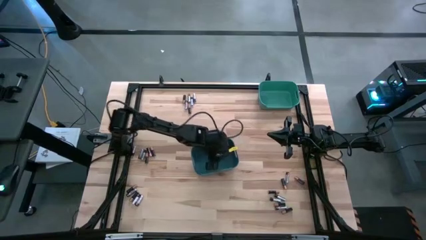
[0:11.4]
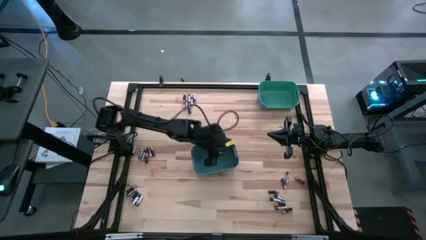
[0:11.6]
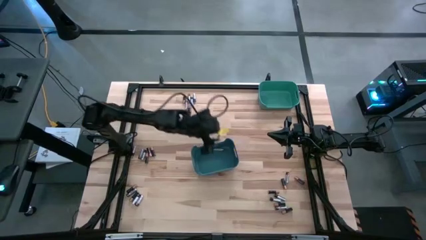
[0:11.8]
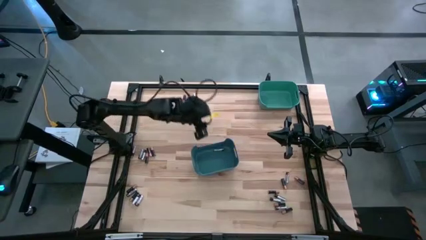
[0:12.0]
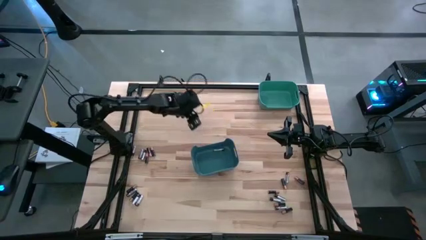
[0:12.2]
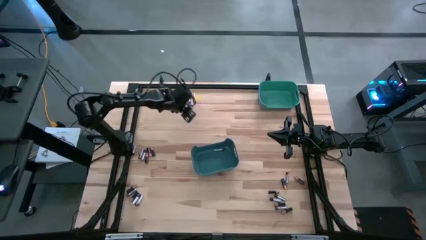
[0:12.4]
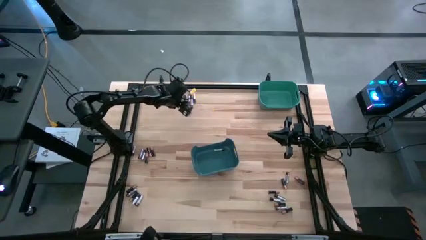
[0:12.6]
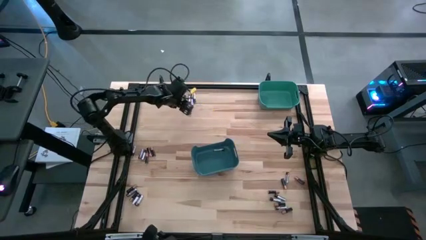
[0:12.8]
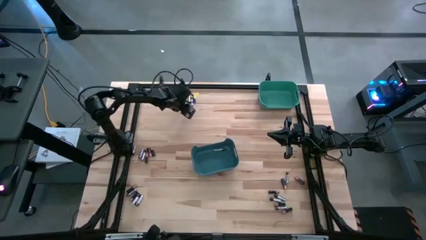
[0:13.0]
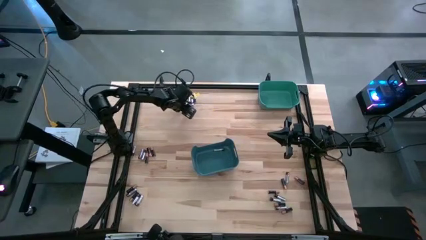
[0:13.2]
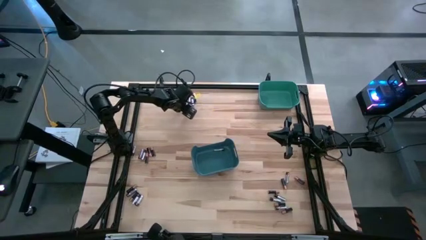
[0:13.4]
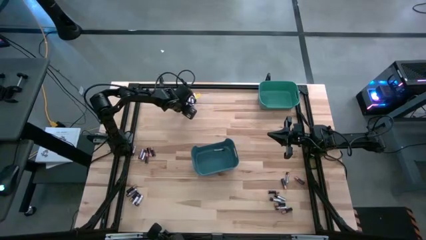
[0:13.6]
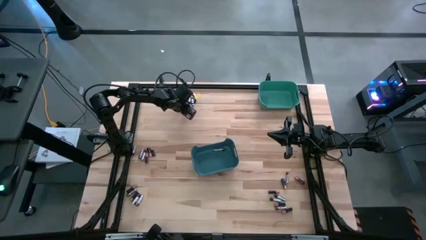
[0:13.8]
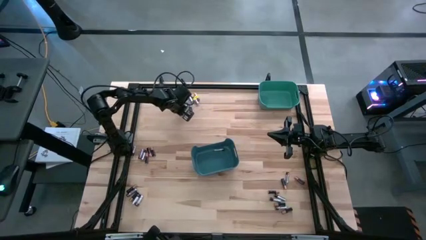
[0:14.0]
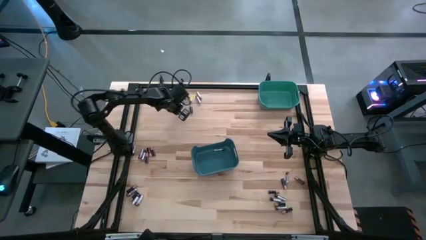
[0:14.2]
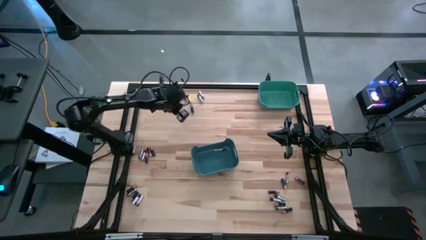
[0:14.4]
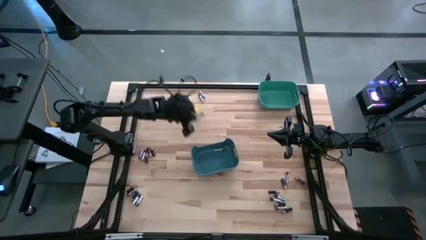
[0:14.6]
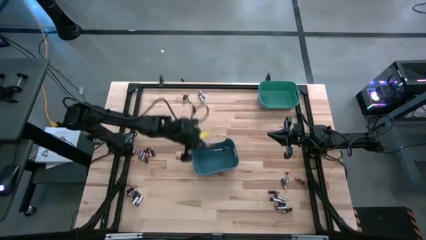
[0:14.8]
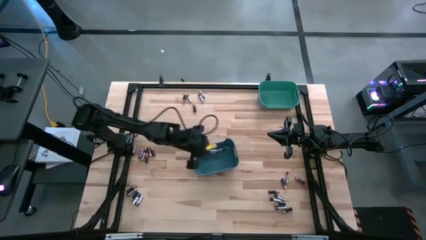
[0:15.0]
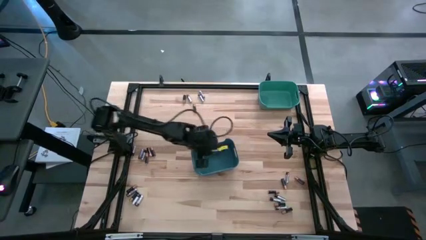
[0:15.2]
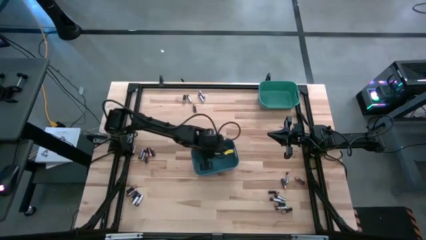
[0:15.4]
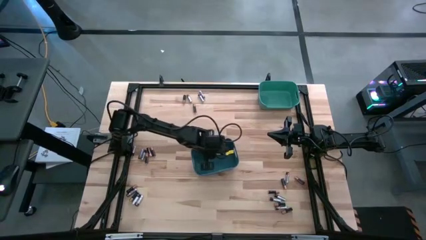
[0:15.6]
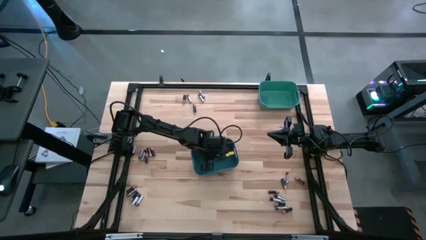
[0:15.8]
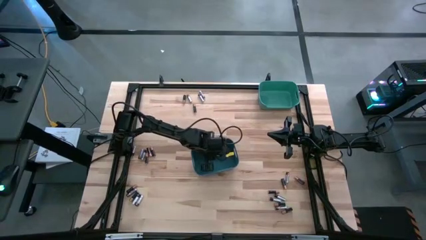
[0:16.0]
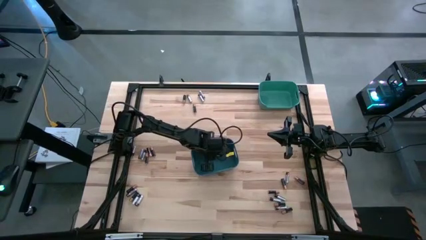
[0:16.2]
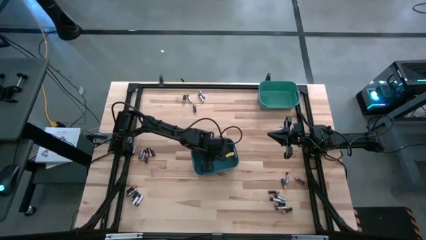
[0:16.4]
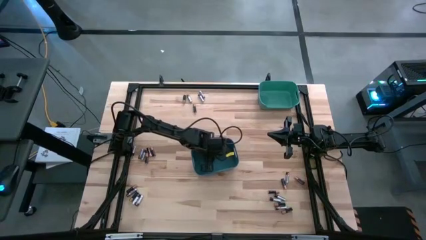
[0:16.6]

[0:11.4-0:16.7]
Task: Sort batteries
Put the silver battery into the blue bin

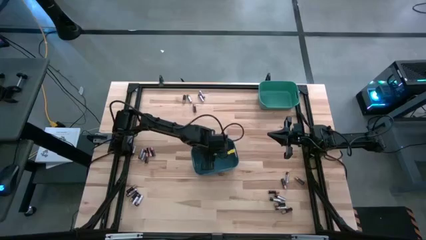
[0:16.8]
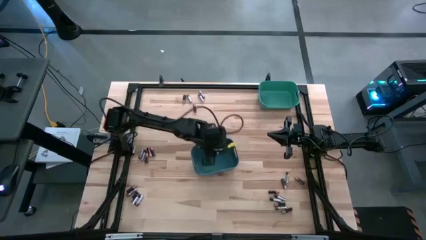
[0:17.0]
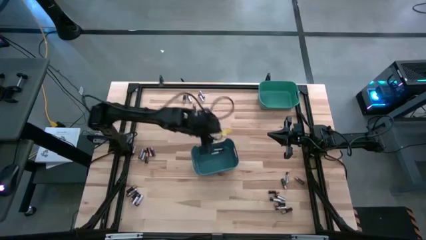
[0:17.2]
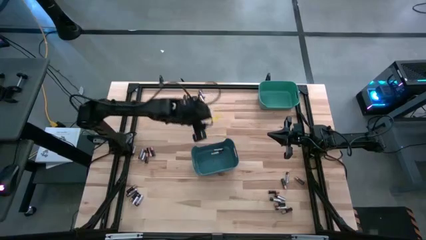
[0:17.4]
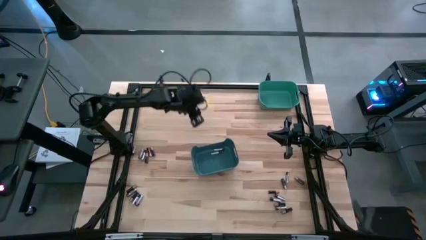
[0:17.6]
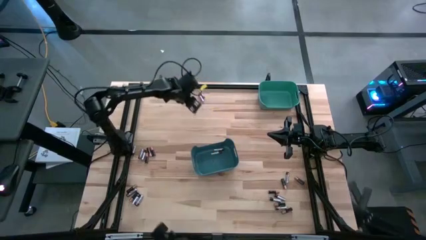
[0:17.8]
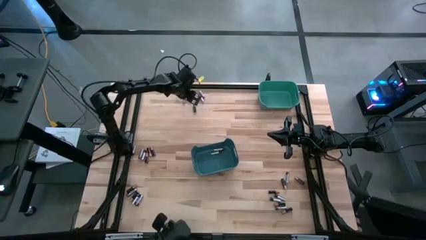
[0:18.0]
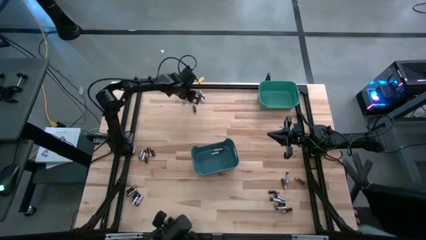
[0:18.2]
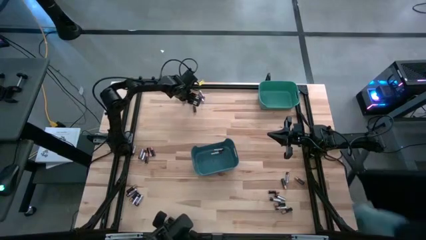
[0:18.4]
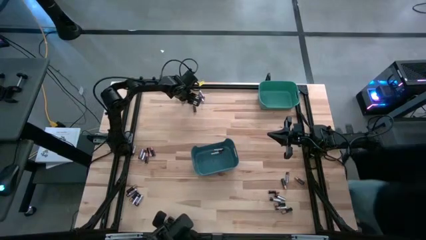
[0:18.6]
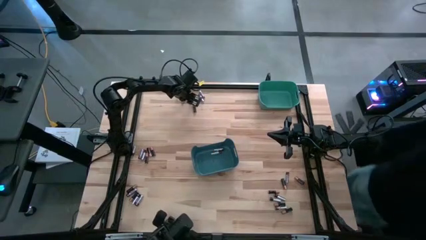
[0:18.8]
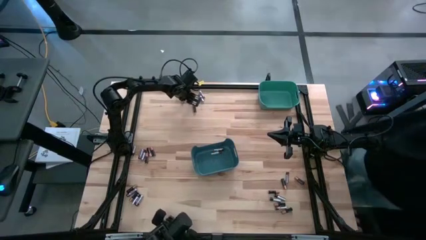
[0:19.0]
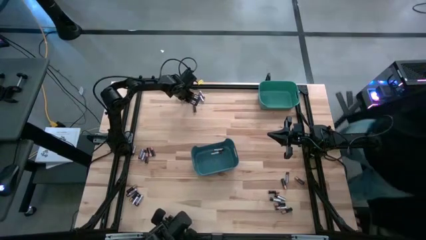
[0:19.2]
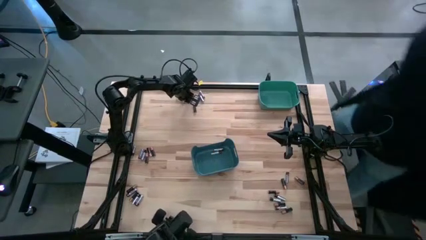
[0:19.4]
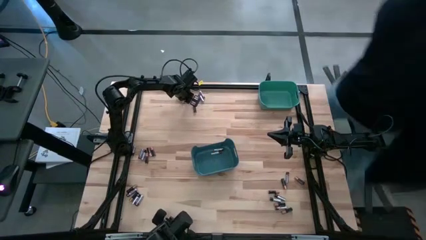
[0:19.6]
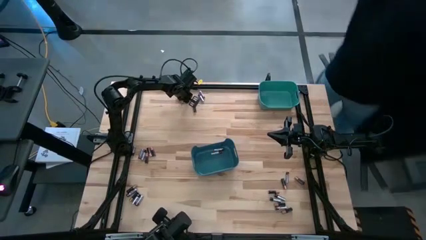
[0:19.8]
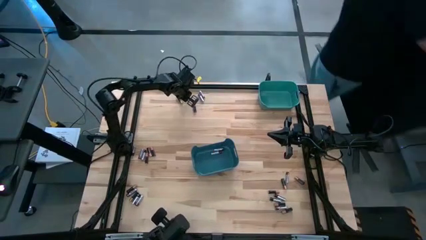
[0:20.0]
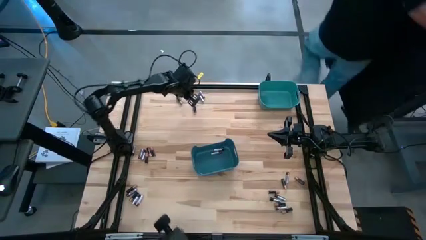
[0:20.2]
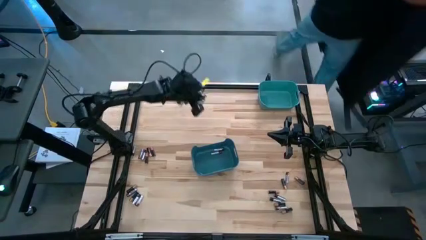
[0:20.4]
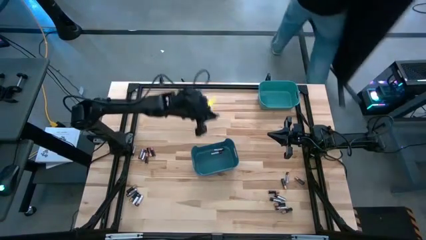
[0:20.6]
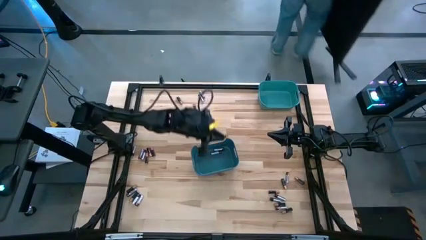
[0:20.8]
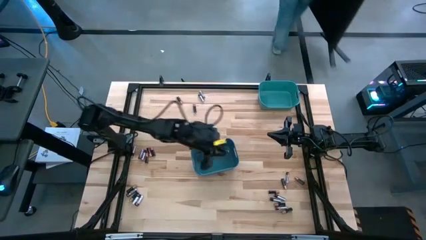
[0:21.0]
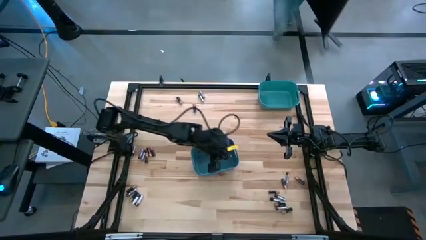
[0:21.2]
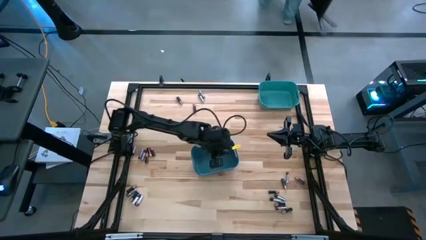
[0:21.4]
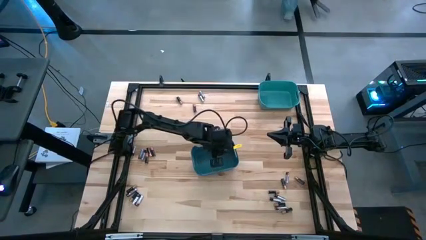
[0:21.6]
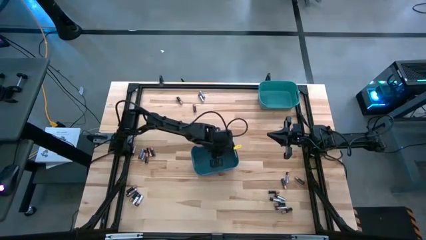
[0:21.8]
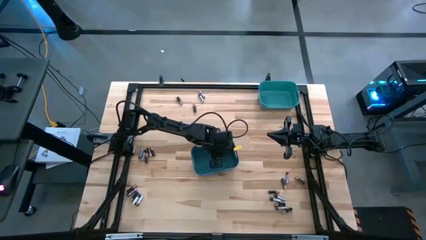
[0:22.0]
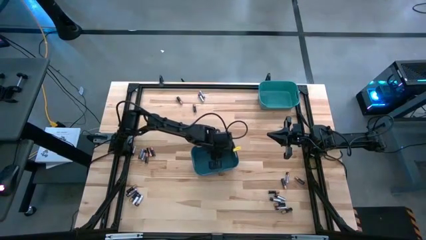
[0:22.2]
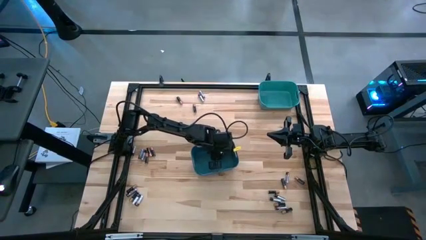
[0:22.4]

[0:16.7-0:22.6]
Put the silver battery into the blue bin

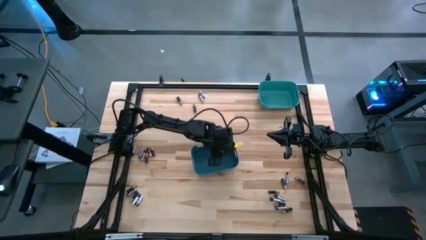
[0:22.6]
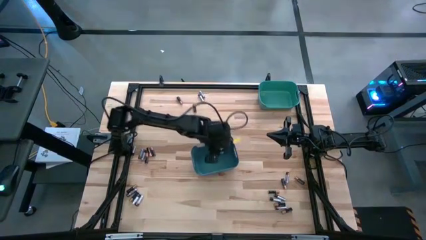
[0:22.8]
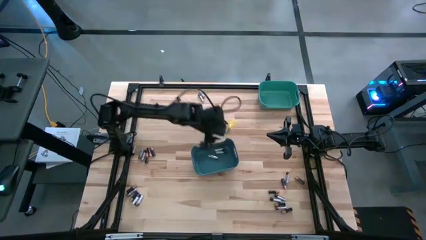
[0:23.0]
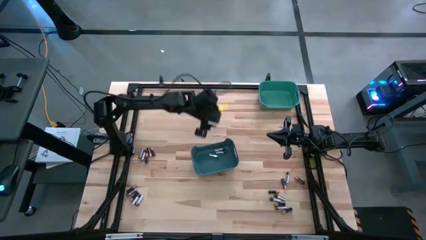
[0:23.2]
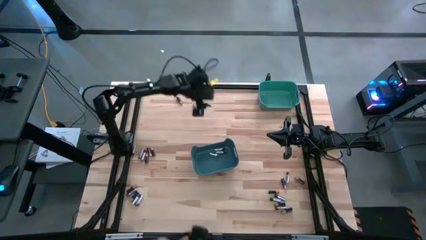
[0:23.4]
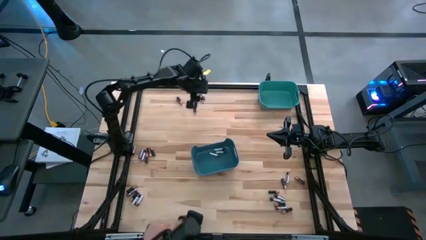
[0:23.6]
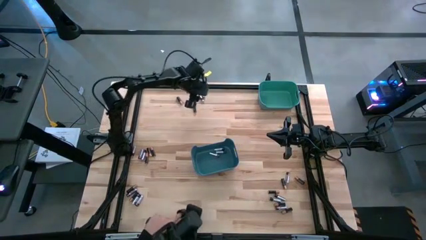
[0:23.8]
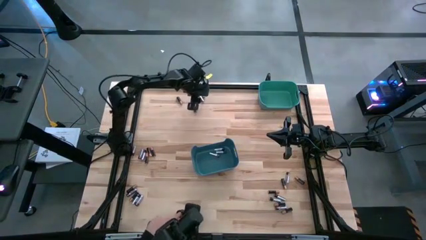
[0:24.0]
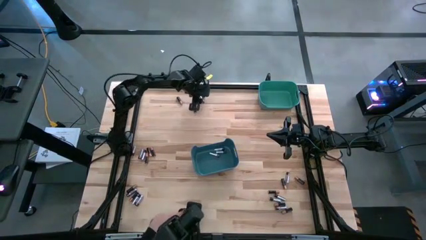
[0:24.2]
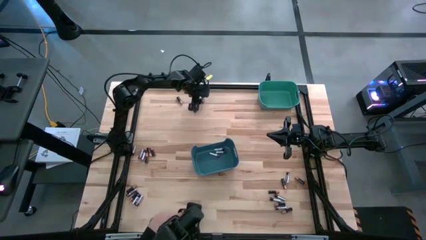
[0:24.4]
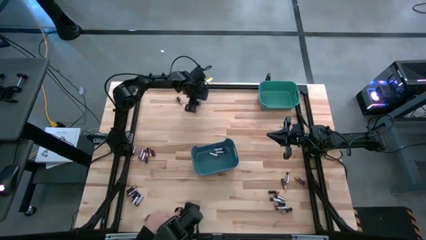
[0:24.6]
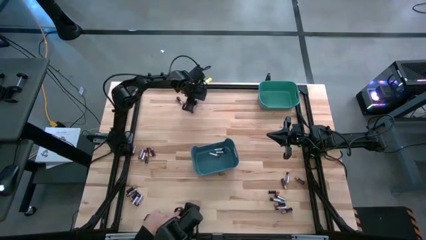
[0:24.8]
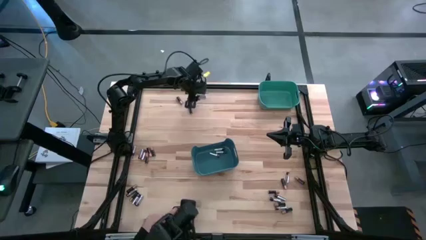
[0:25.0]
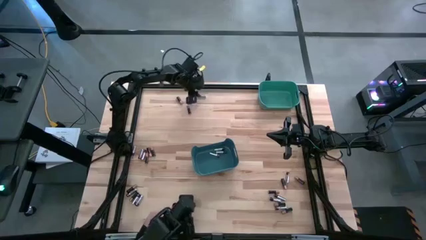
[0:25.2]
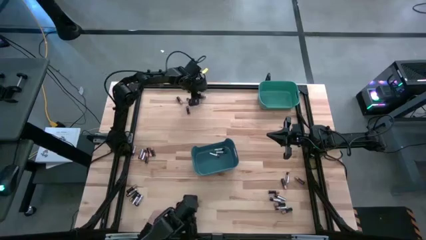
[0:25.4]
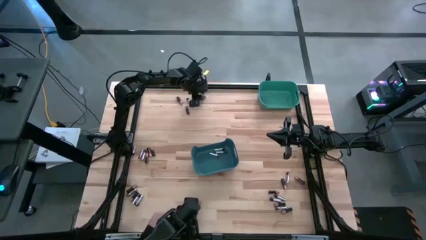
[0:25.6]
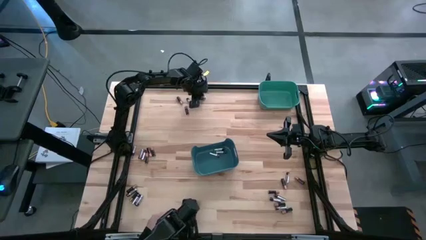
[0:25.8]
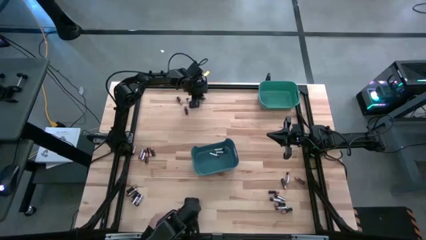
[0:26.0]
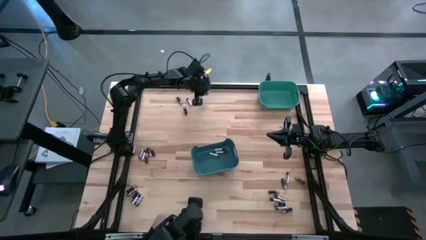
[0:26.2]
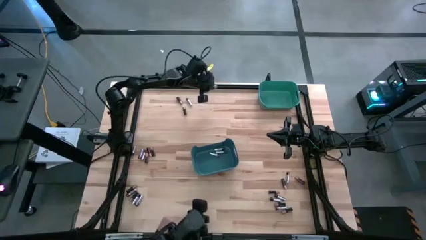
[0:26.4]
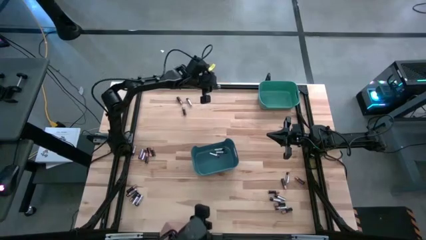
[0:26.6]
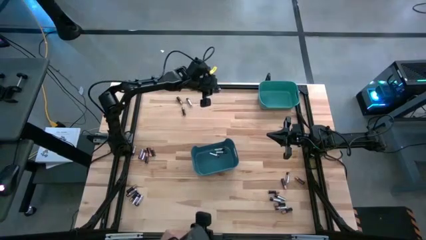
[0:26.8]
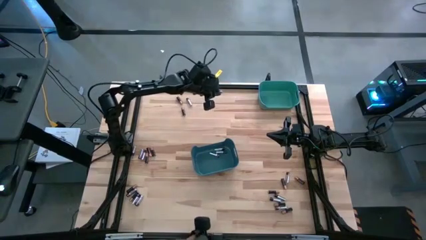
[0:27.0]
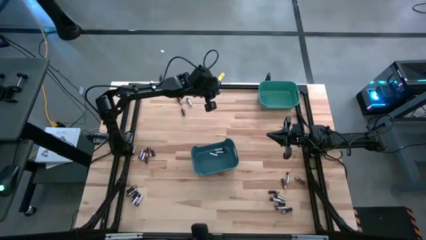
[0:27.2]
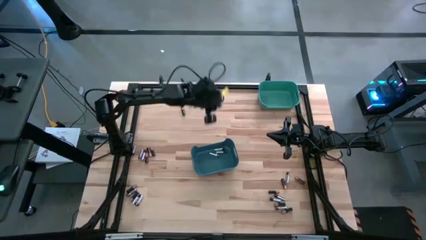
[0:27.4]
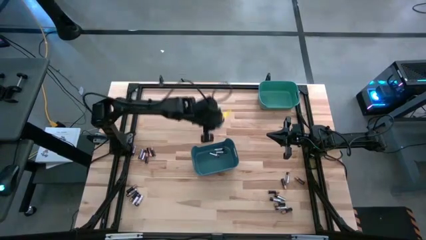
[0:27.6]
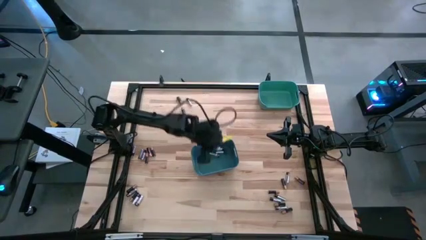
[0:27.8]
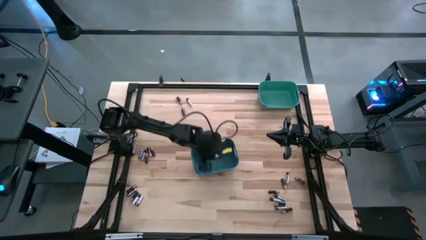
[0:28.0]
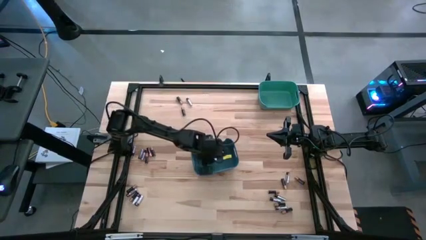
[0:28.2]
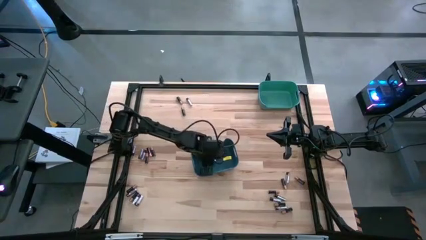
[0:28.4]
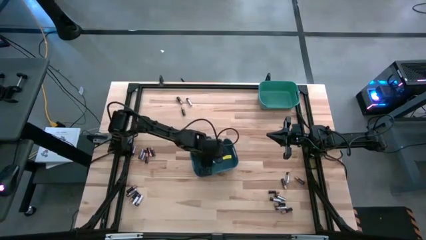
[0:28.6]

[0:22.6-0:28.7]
Put the silver battery into the blue bin
